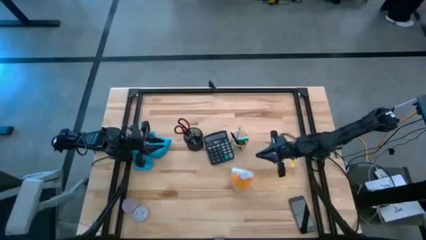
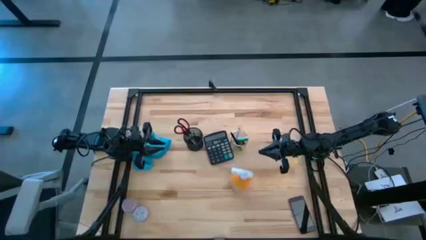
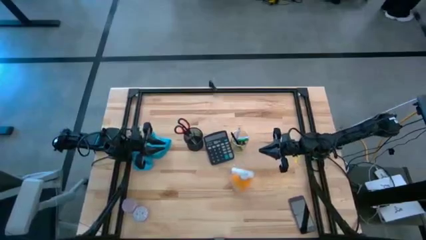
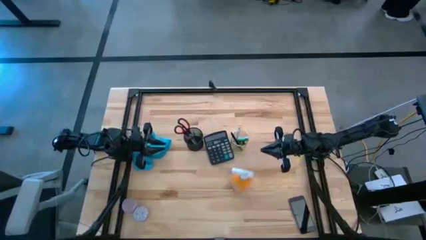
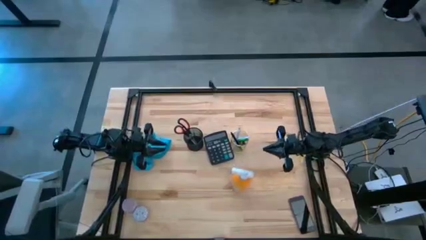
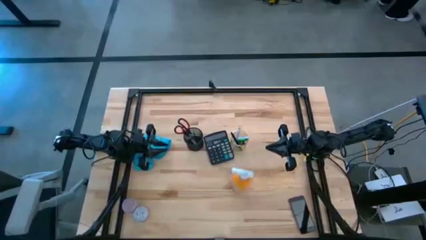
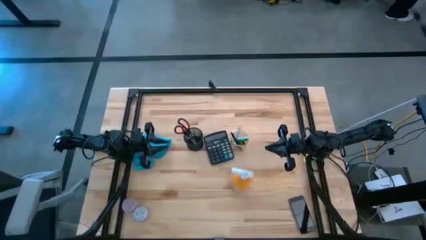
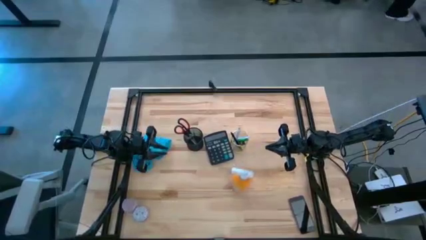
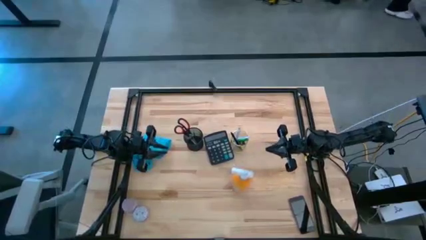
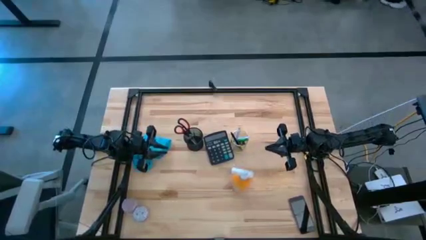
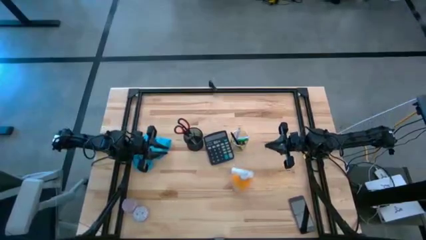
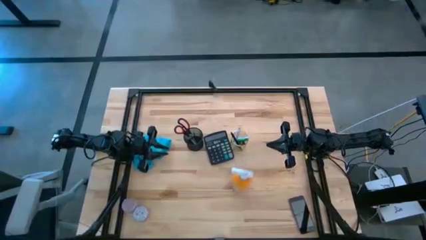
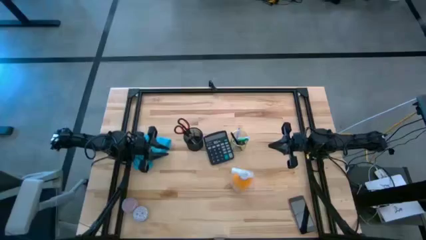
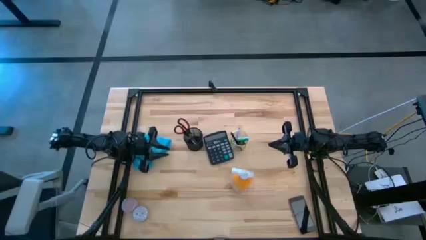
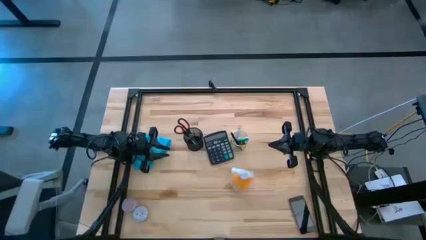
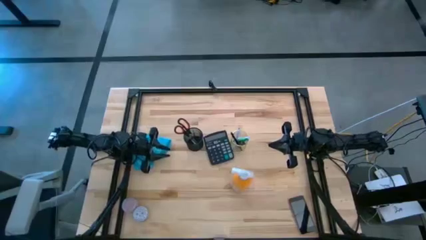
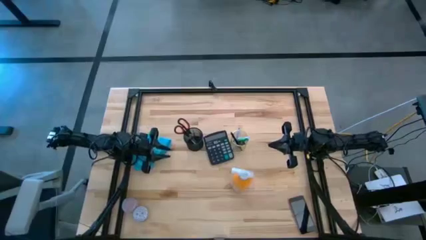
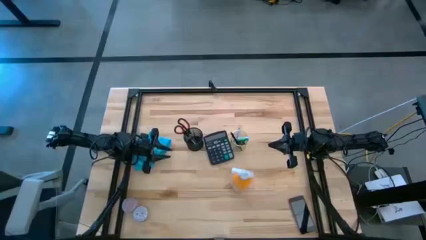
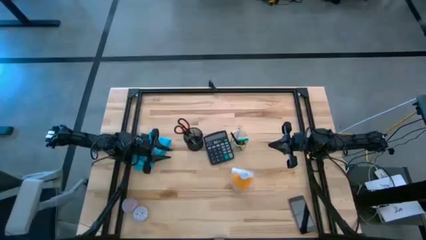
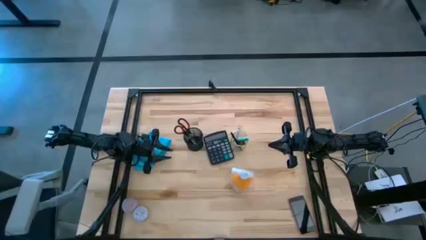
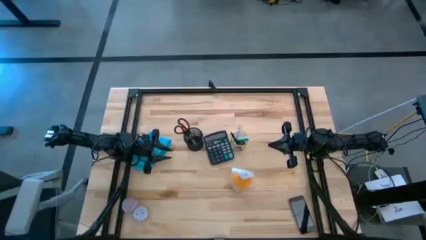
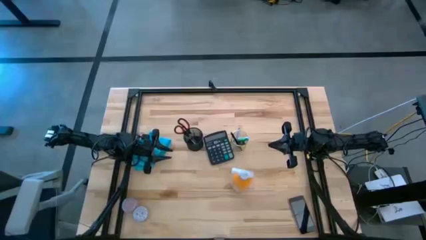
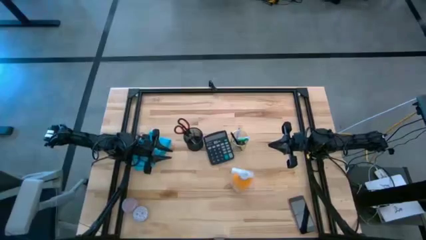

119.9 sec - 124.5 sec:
Task: Apply microfiber cloth
Return to Home Position

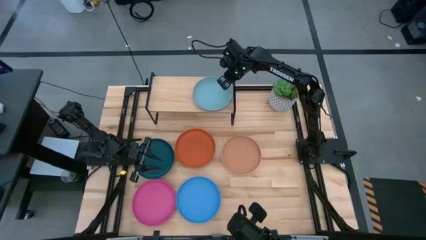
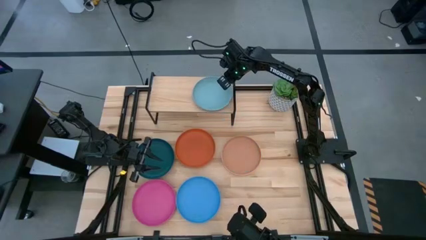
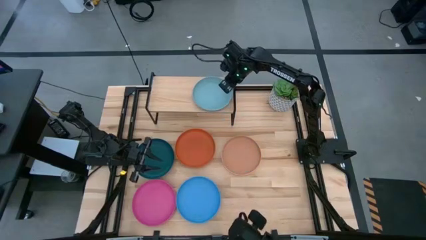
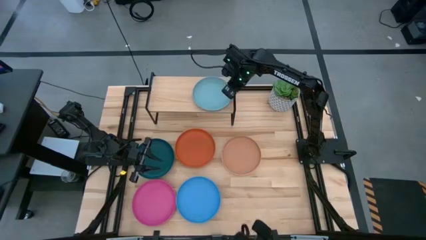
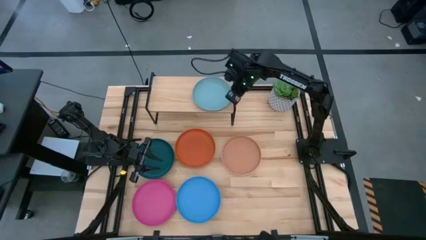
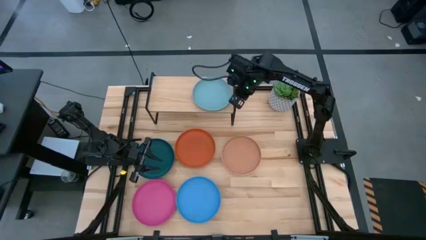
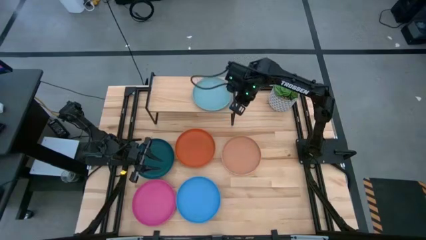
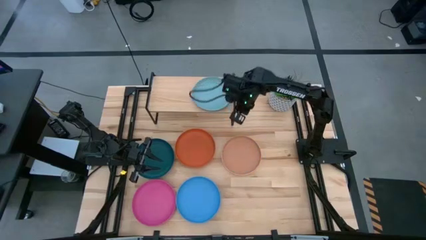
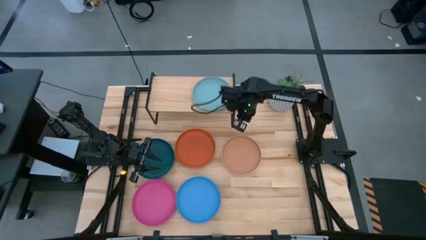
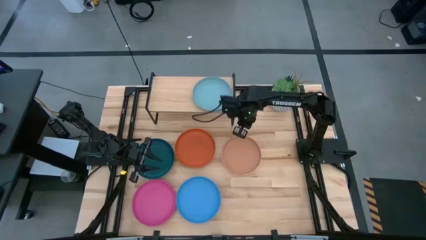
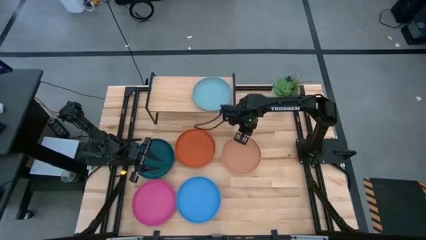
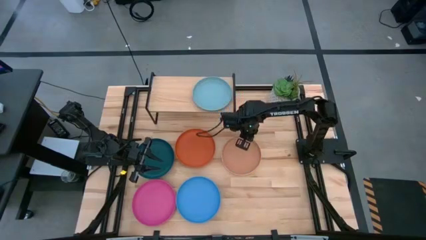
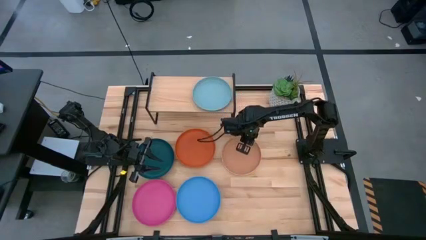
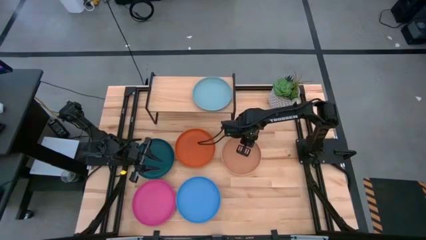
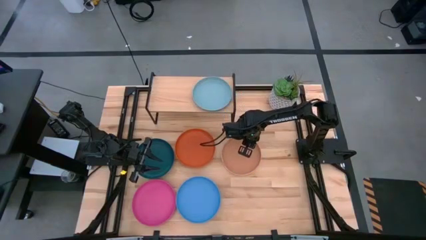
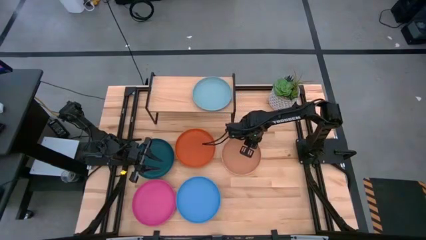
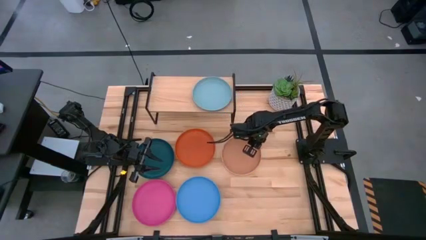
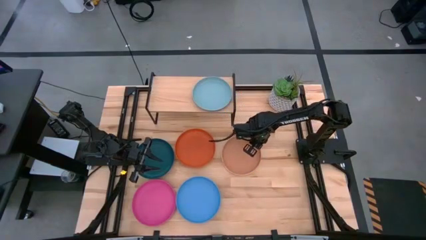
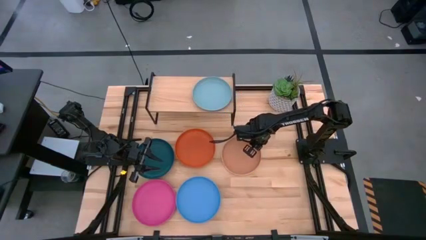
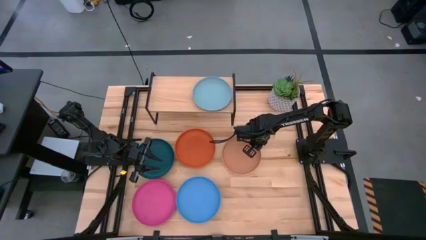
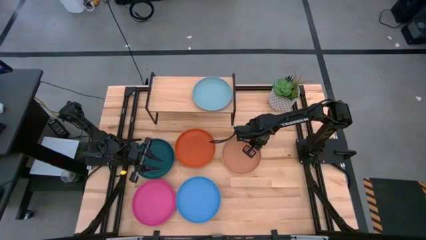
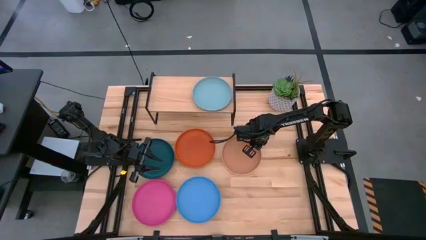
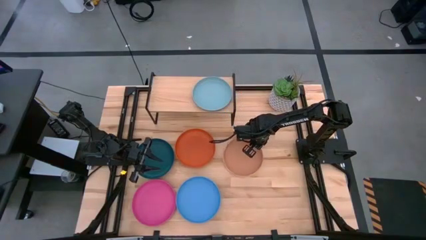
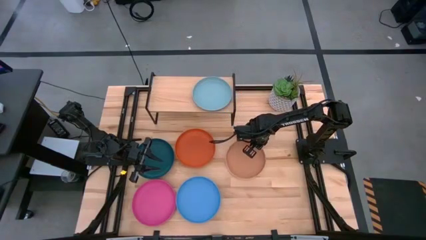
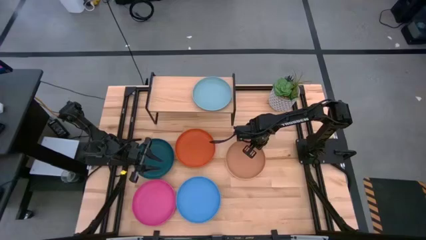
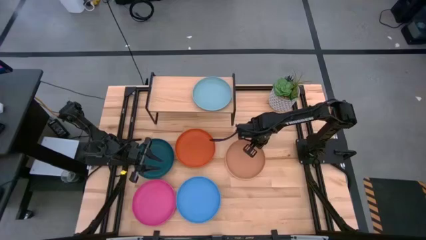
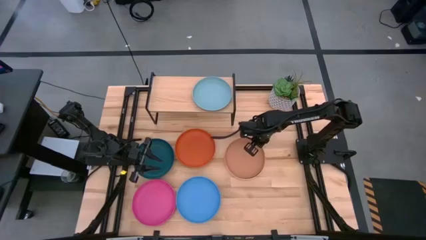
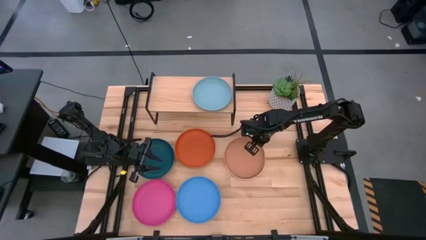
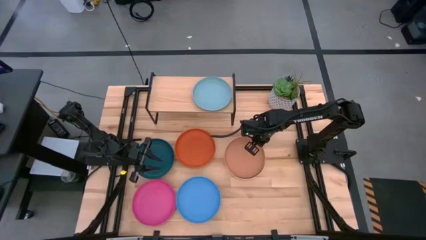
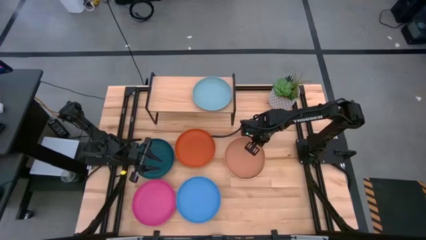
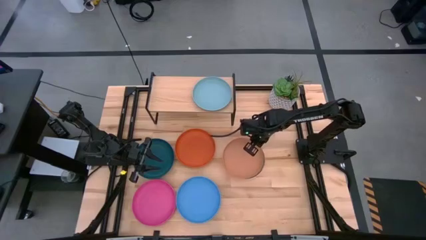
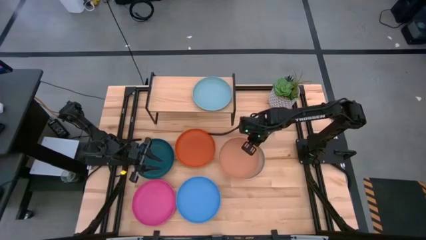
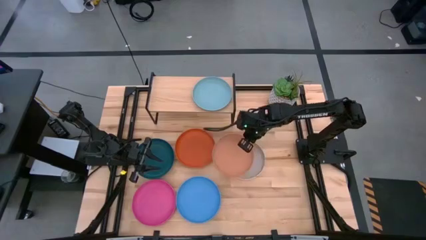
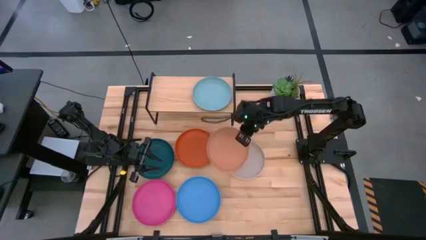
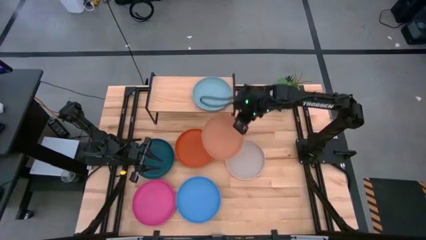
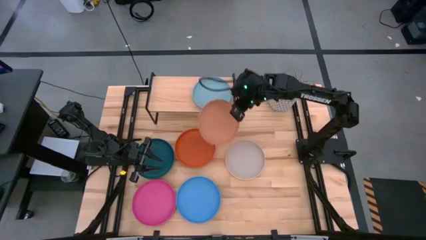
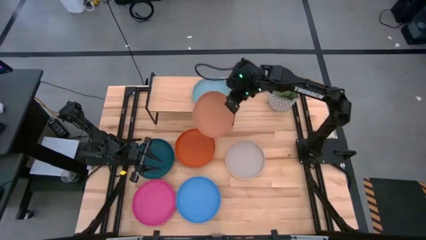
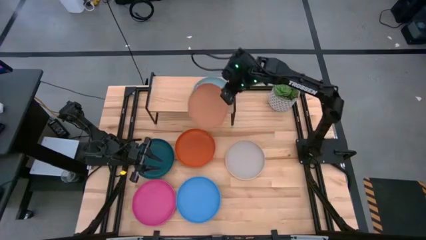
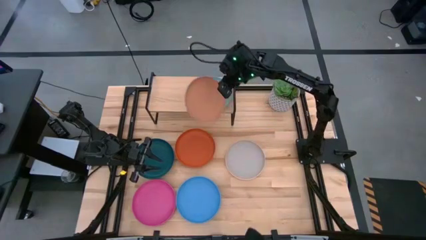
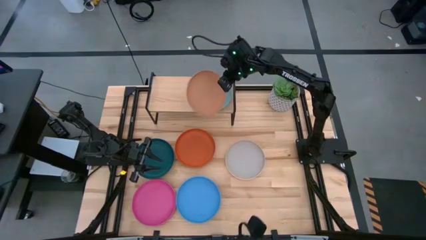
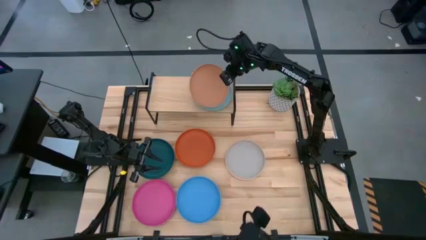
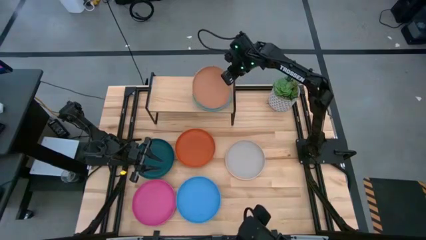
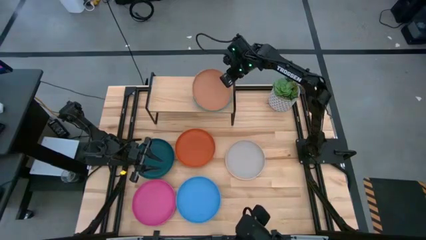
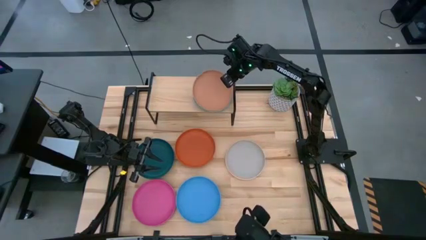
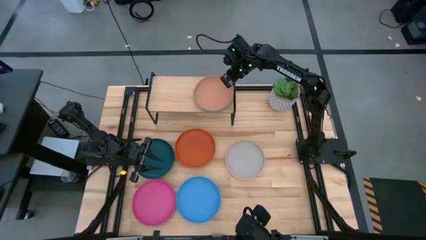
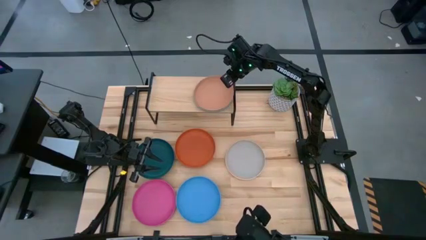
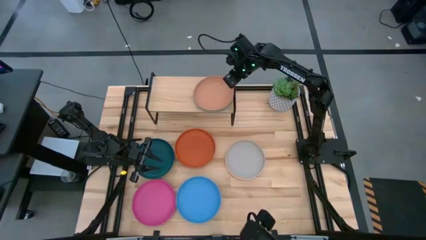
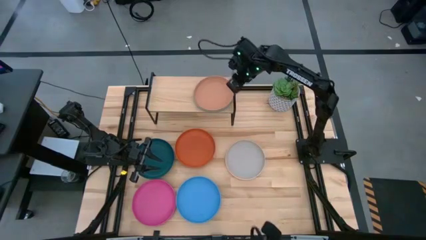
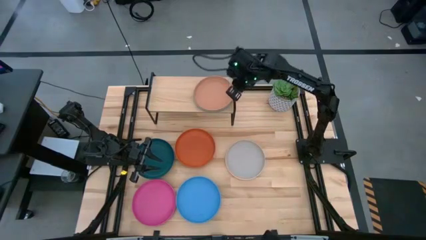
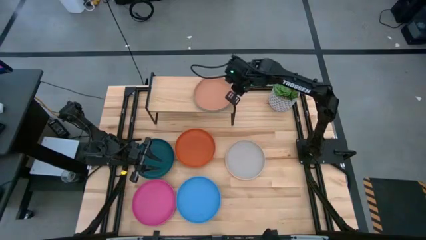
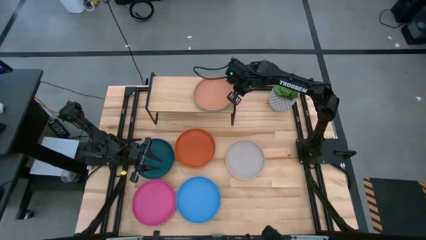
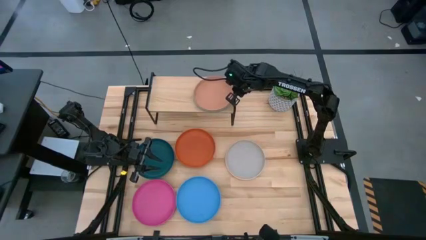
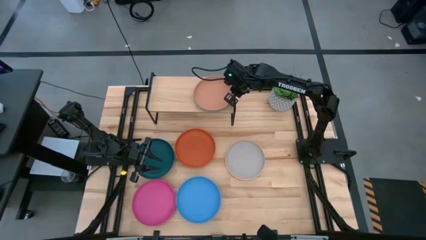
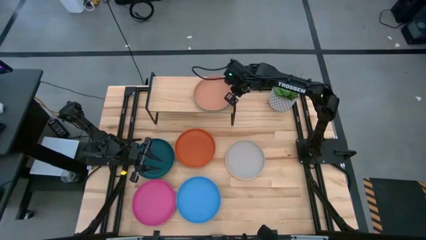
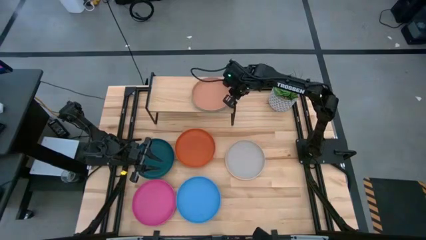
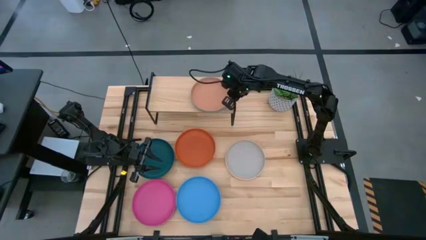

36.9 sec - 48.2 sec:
Task: Place and stack plates onto a shelf
Stack the brown plate into the light blue plate on the shelf
